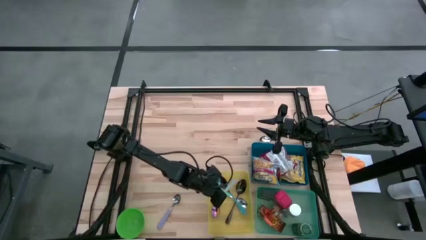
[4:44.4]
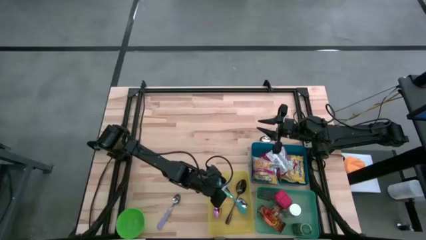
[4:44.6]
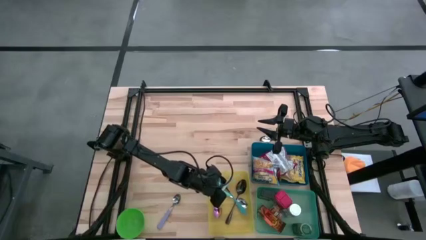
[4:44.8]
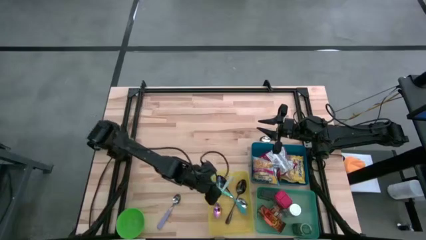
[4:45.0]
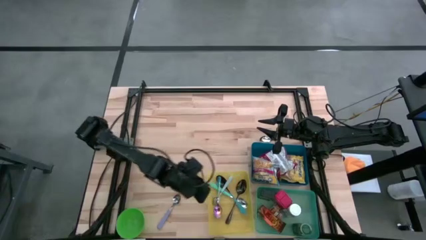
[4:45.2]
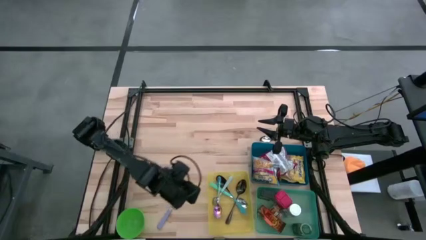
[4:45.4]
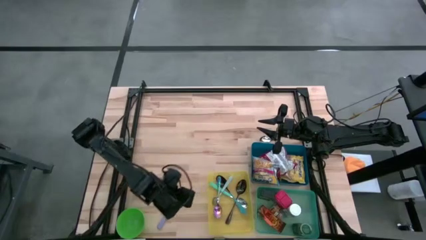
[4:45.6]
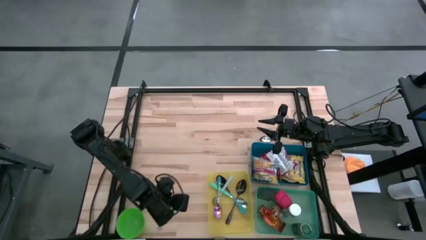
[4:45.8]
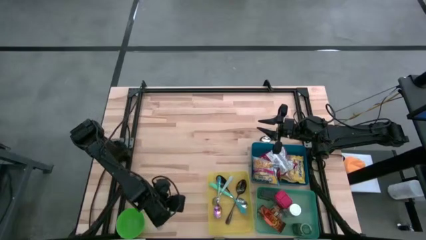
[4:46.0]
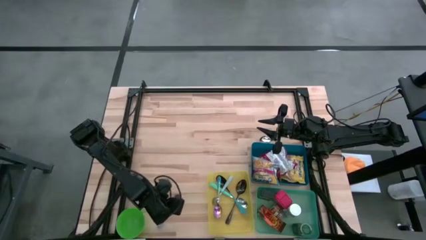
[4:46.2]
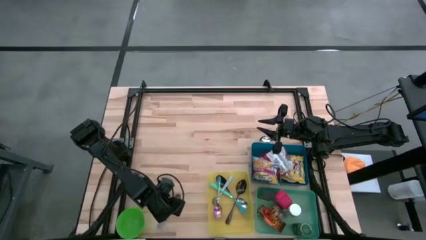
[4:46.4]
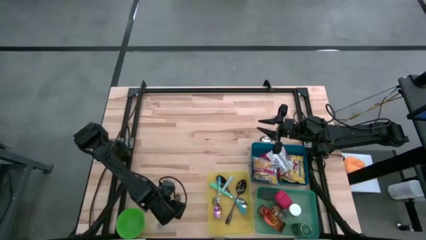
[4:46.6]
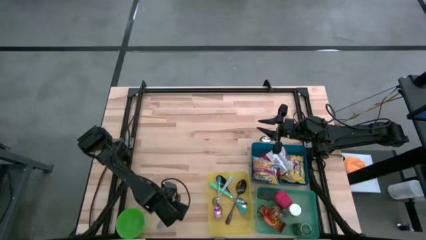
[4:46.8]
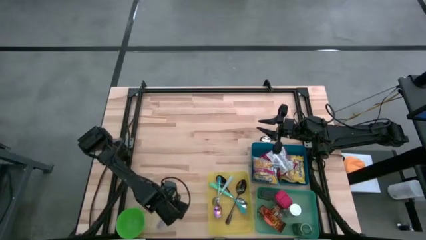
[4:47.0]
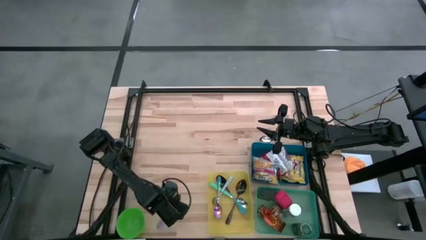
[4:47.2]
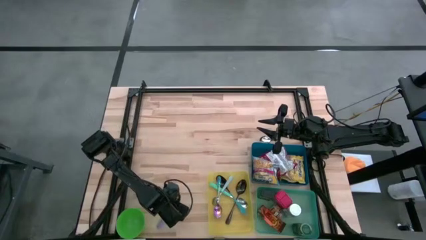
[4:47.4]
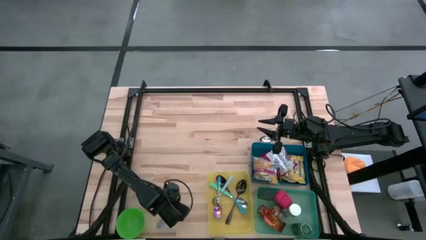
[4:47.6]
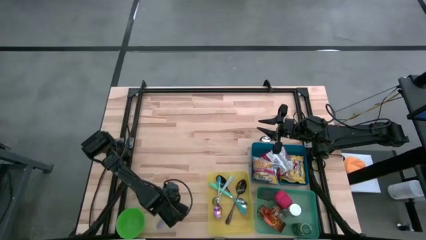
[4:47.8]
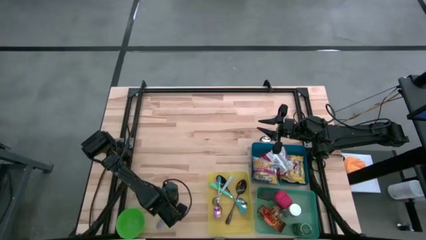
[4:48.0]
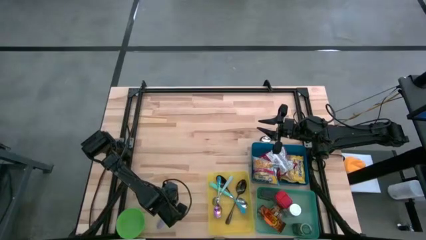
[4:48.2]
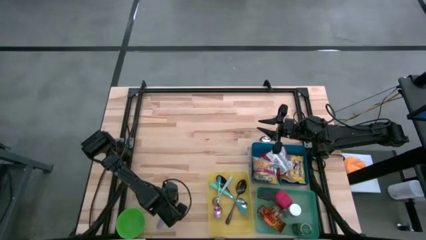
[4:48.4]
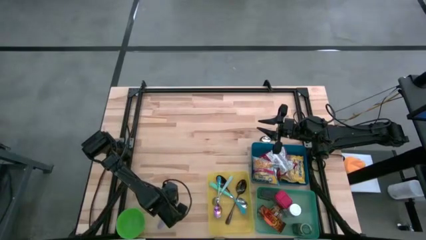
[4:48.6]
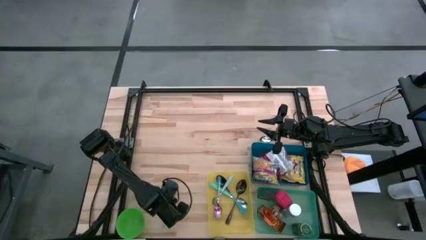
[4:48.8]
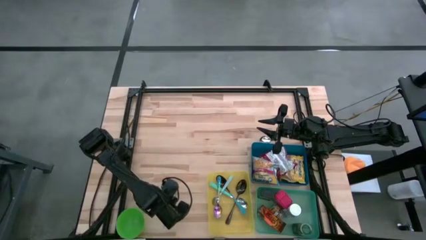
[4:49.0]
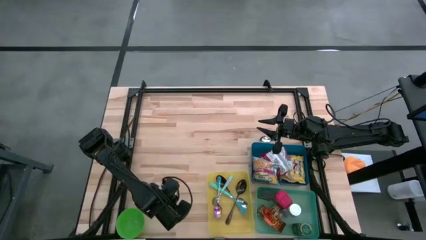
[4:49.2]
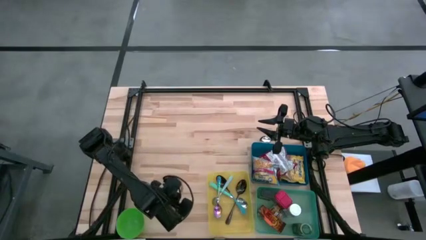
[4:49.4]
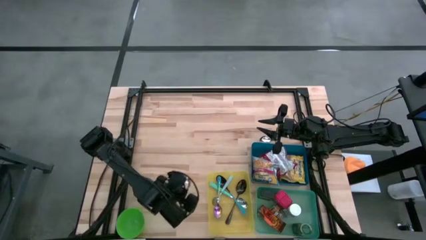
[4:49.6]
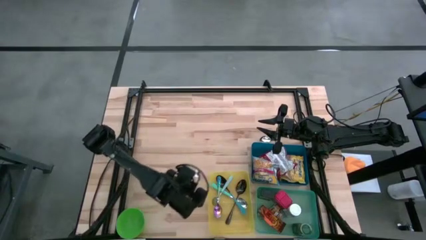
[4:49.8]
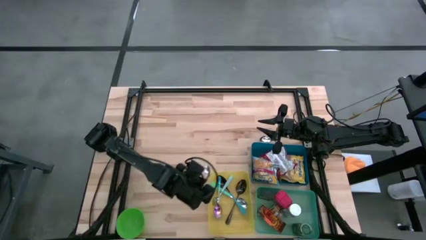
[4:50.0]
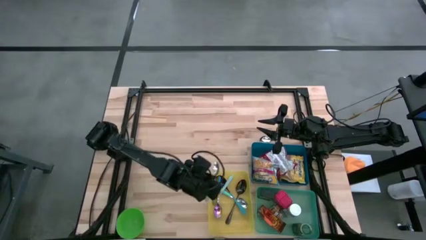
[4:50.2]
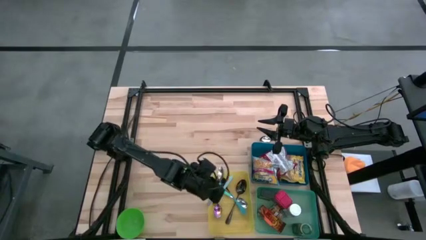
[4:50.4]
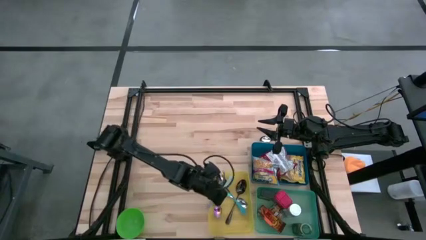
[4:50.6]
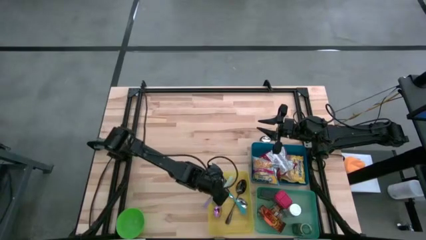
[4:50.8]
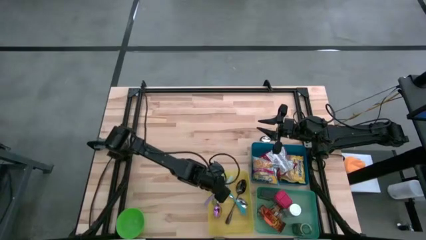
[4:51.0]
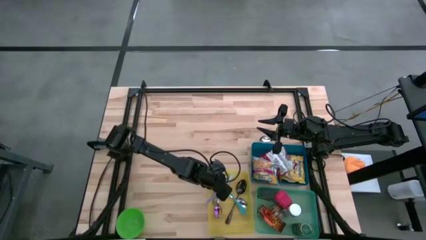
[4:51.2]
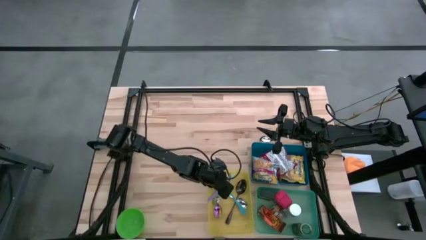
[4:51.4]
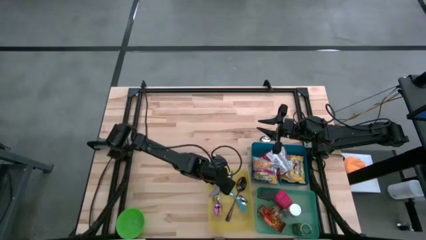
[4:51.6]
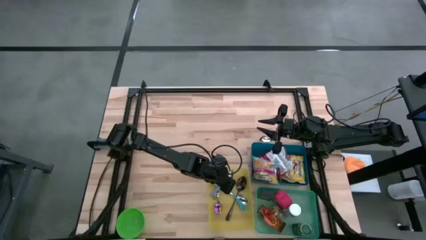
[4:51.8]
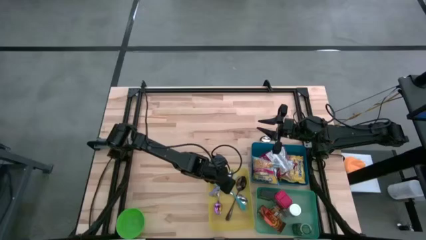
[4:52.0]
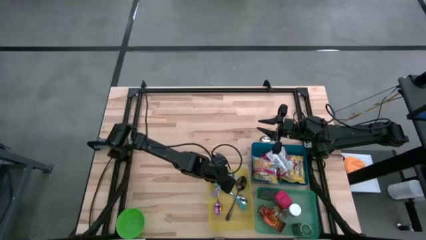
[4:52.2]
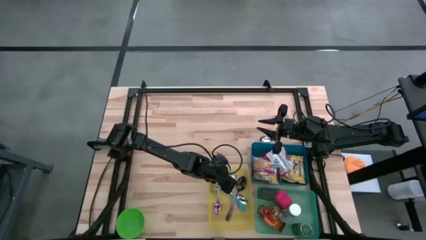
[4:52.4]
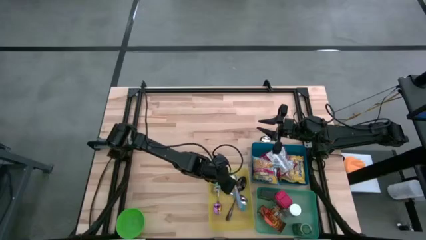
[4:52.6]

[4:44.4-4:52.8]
Put the purple spoon into the yellow bin

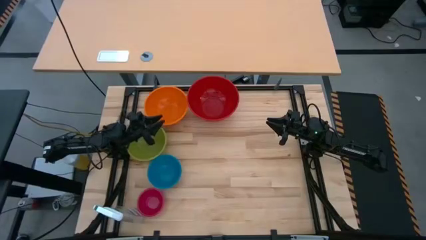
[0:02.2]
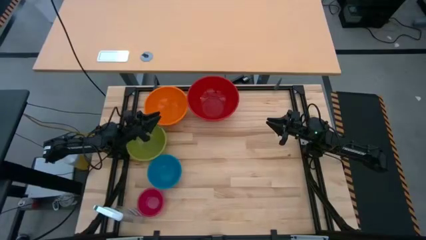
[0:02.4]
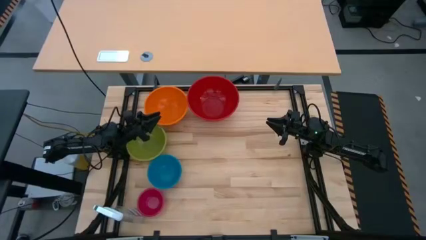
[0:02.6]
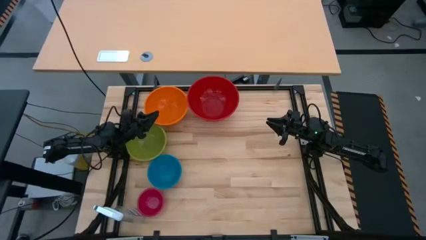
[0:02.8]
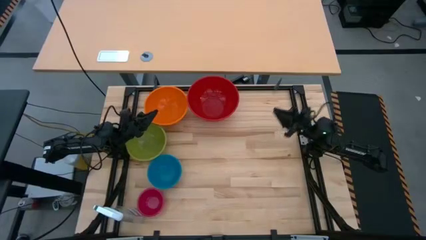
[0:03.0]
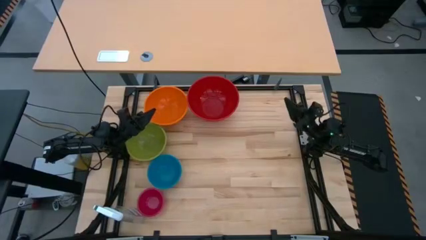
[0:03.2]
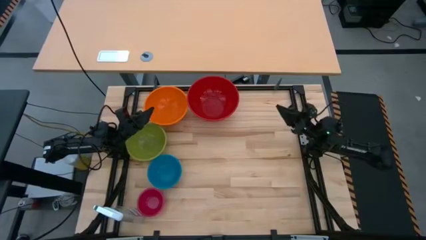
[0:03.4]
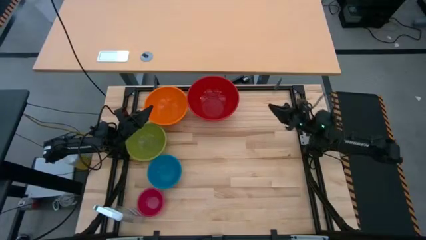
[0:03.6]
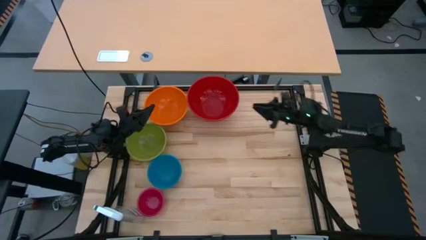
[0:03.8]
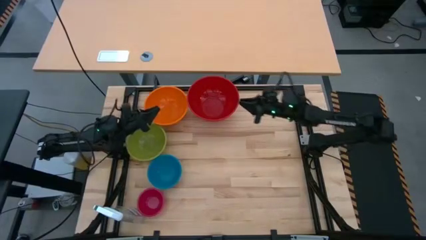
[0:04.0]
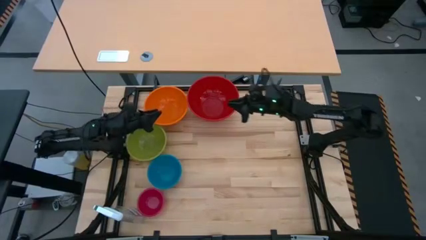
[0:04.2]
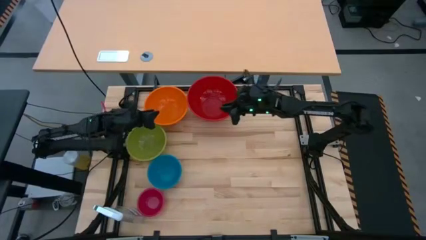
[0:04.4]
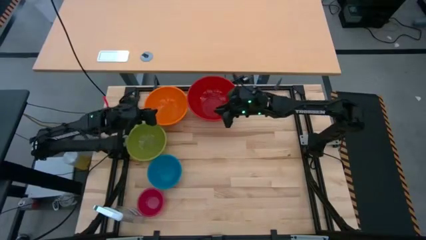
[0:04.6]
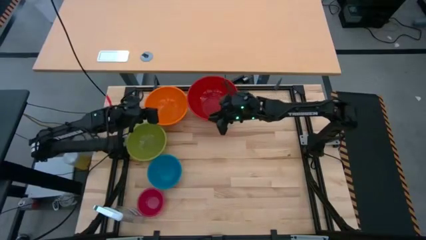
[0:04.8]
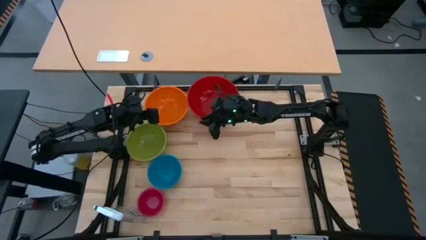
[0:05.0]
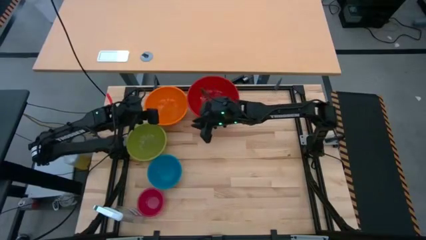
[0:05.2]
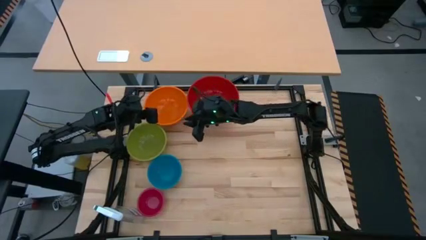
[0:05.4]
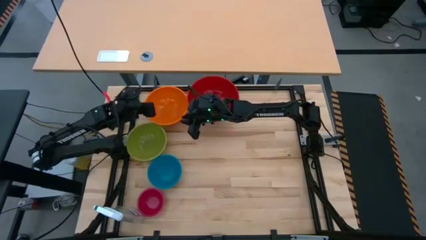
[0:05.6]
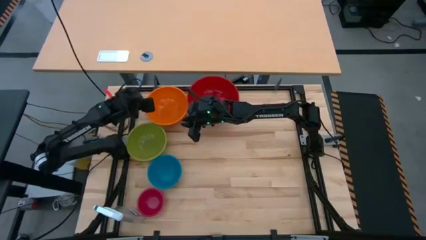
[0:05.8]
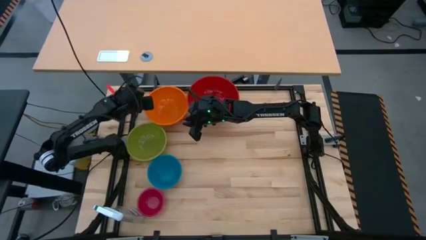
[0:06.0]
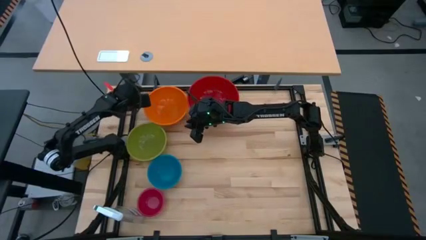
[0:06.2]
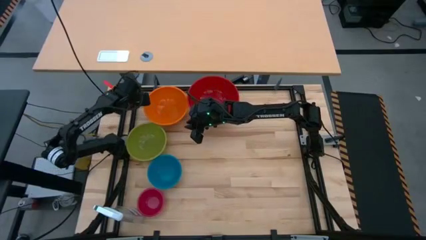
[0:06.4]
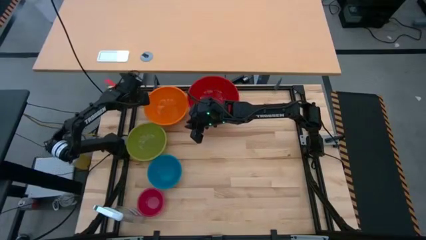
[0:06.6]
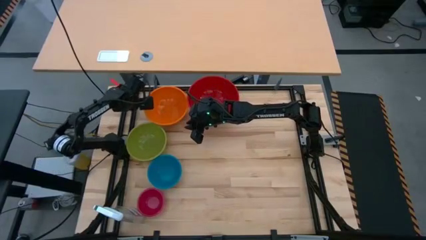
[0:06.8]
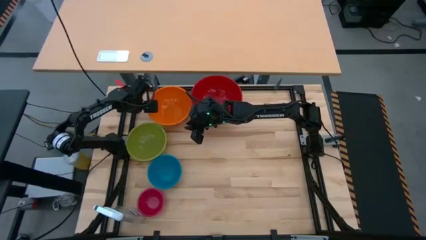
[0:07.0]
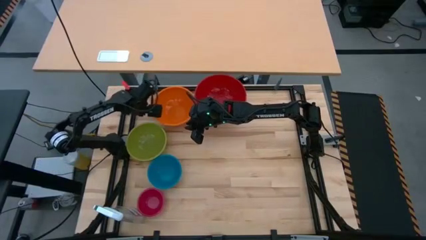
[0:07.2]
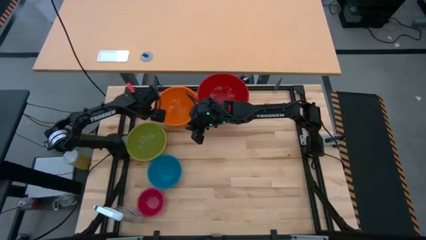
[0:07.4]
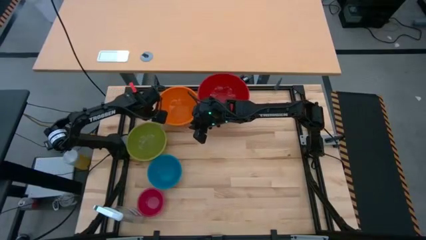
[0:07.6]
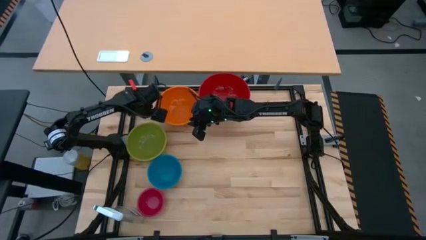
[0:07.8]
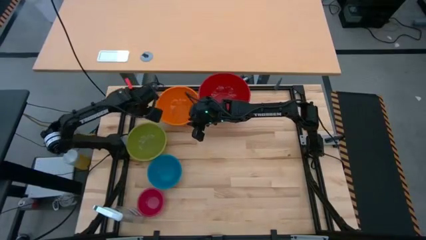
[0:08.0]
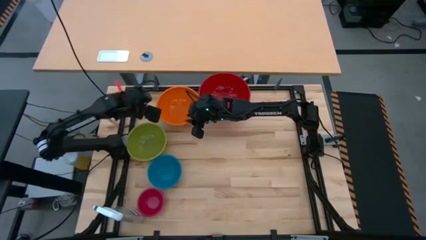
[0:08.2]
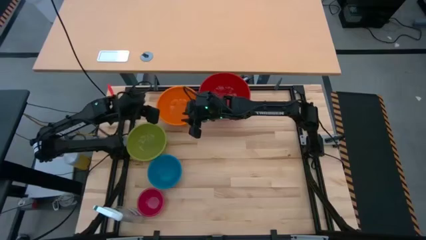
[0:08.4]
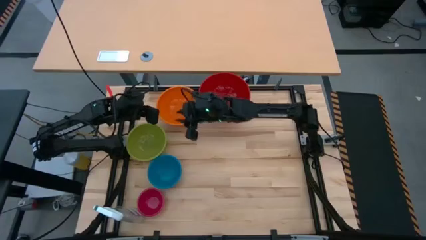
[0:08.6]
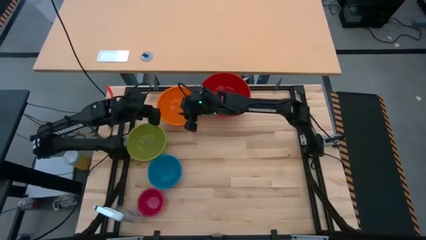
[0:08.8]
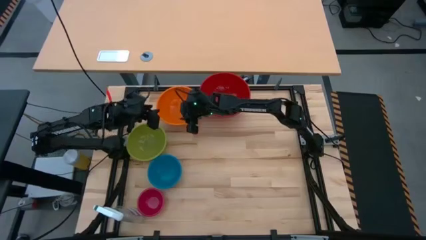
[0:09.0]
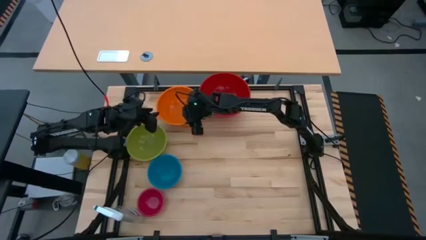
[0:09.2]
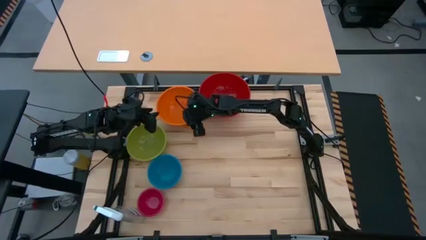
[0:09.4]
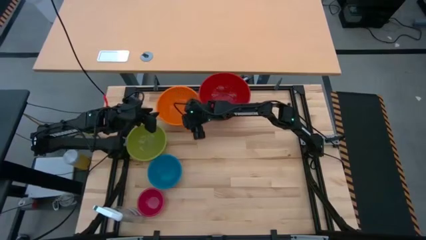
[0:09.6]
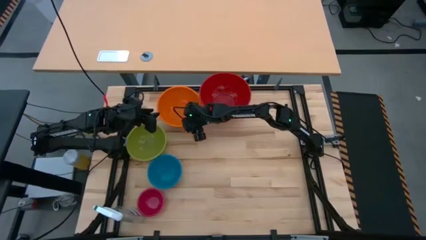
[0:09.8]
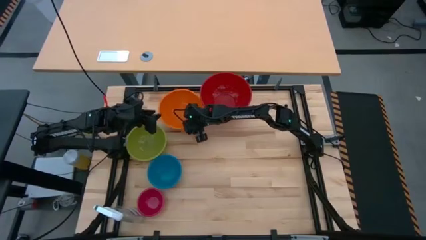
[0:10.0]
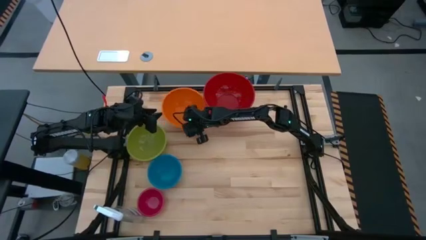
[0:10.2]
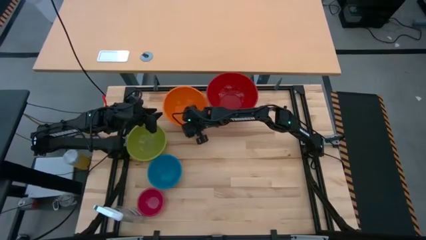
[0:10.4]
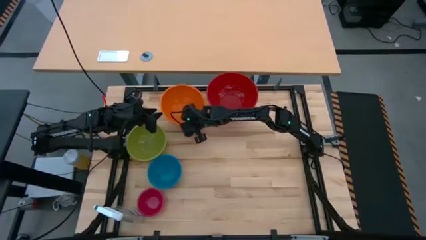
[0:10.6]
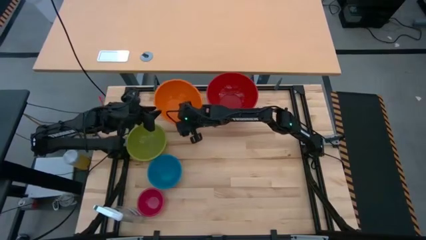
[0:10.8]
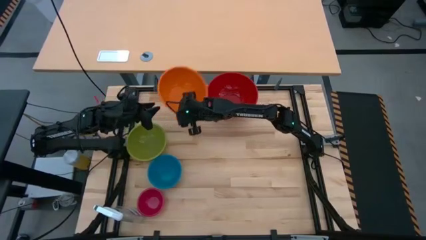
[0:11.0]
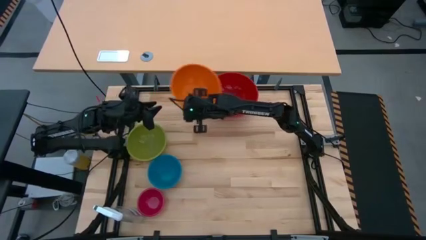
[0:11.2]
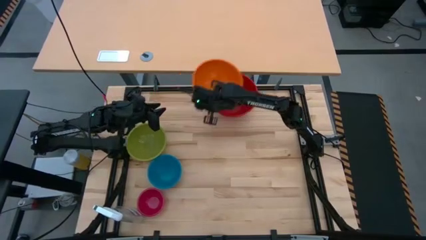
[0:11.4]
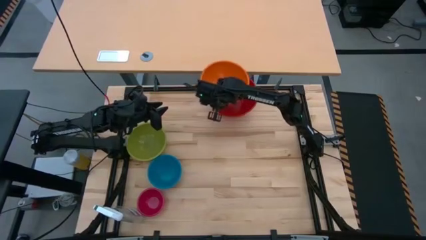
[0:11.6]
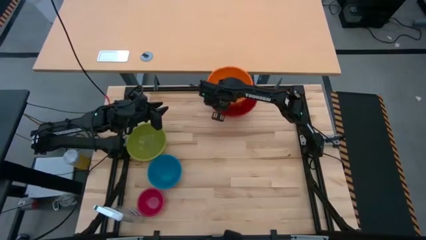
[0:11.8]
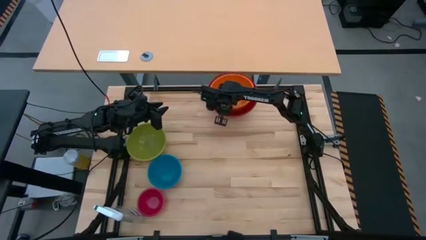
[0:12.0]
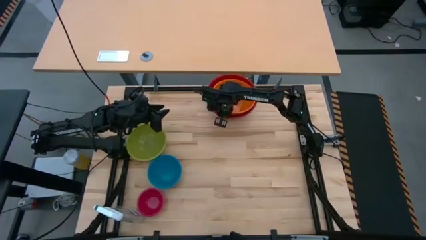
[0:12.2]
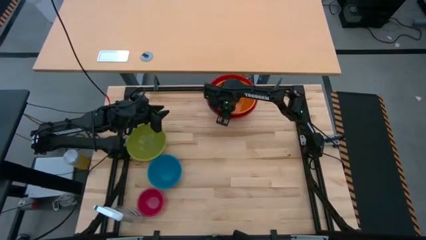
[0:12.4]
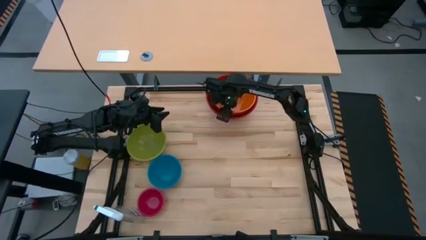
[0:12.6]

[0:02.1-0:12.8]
Stack the orange bowl on top of the red bowl
